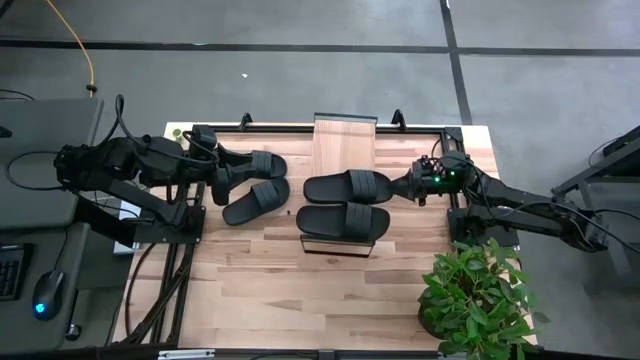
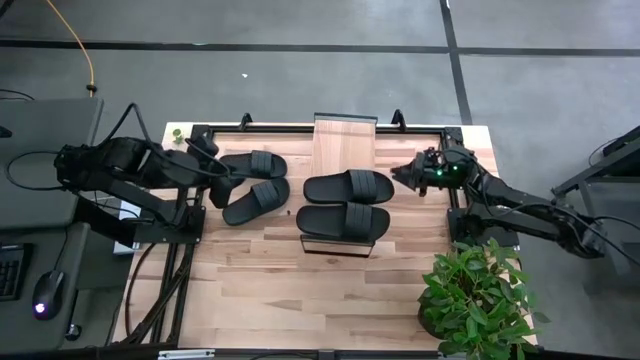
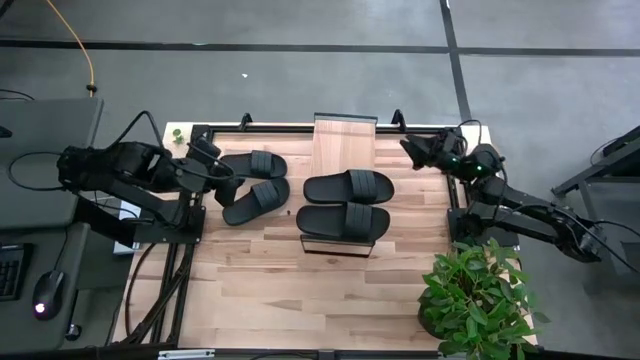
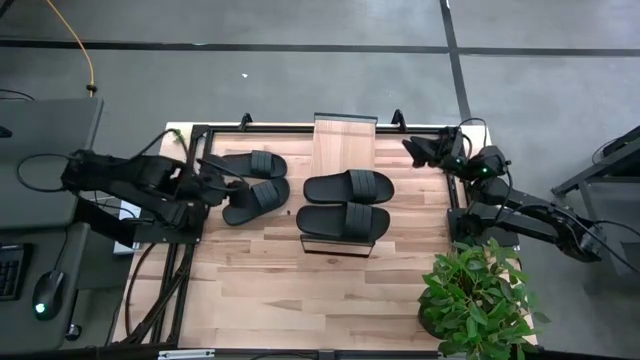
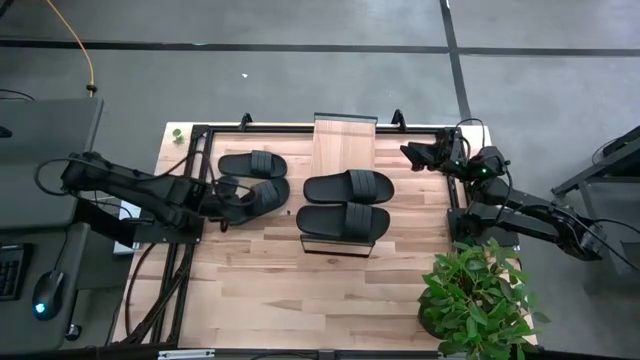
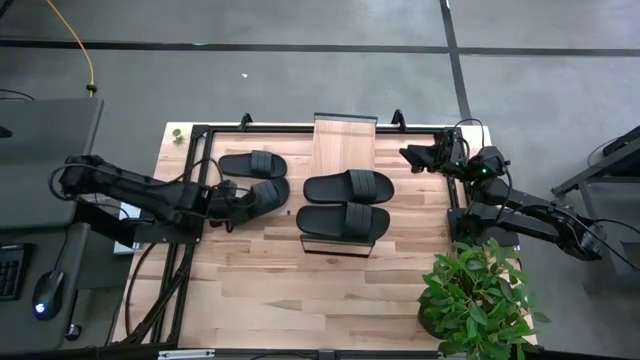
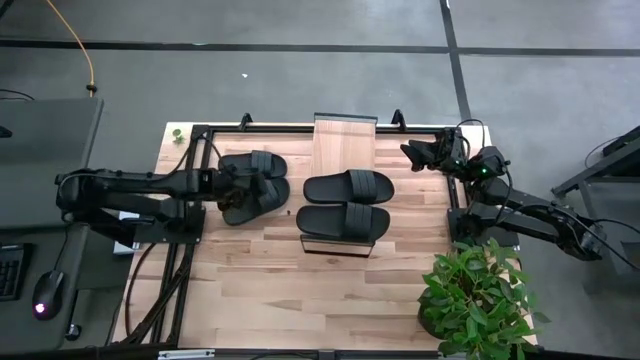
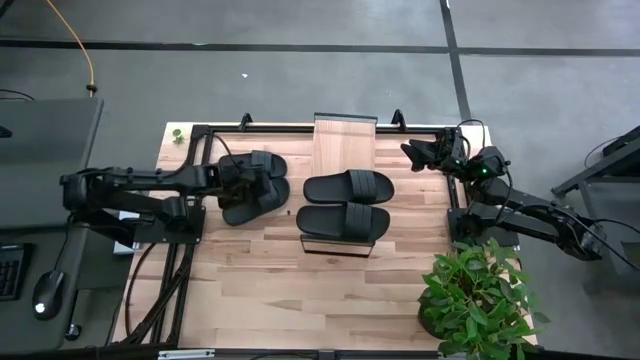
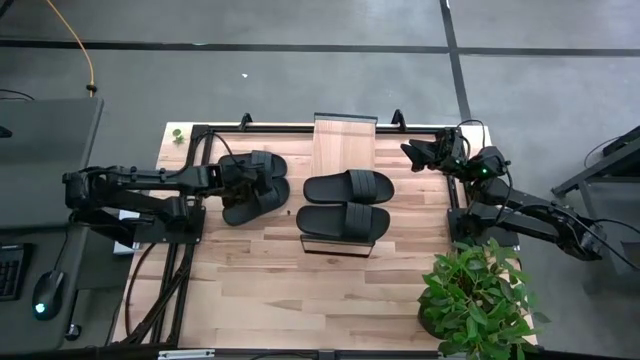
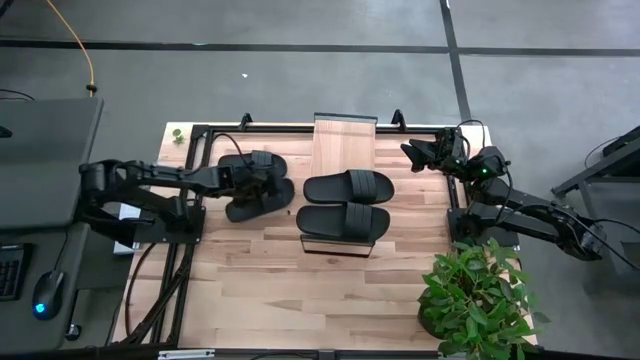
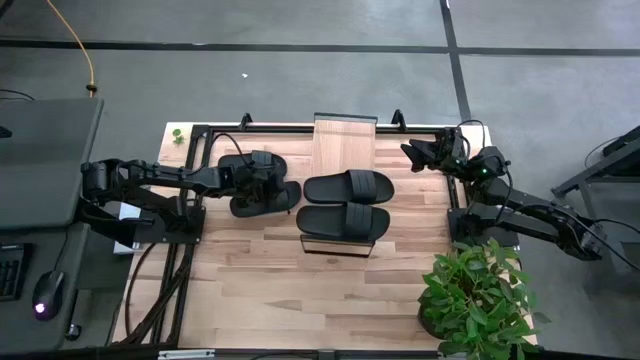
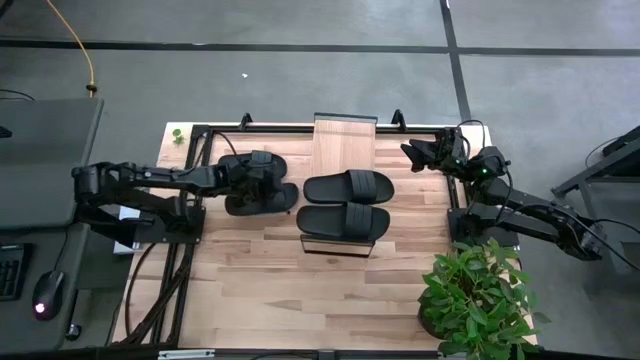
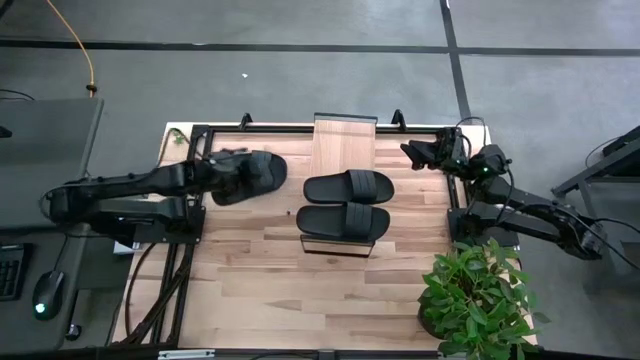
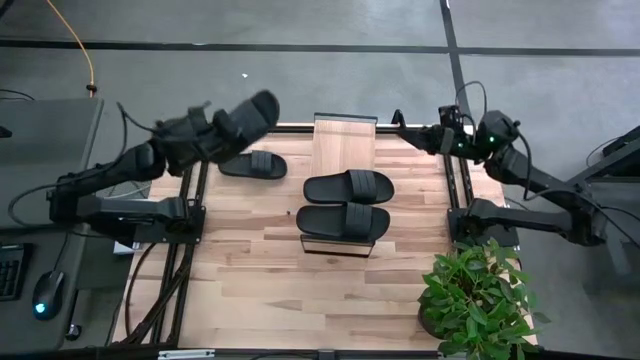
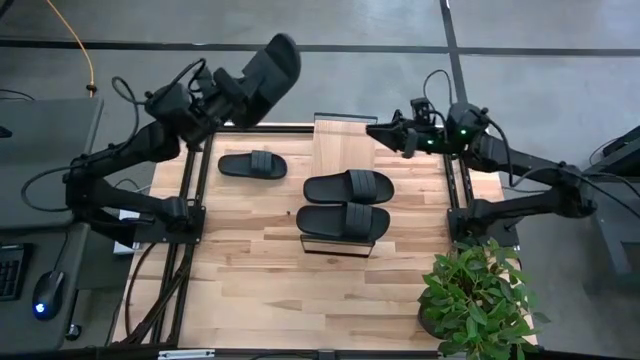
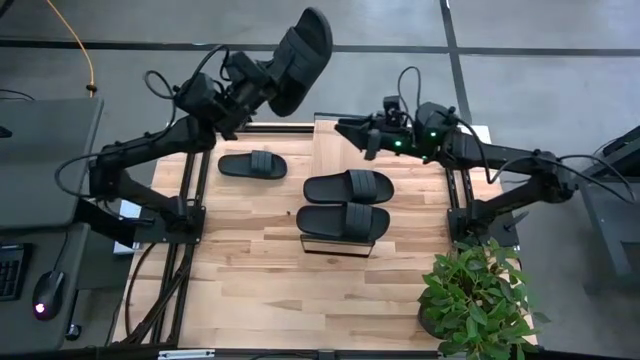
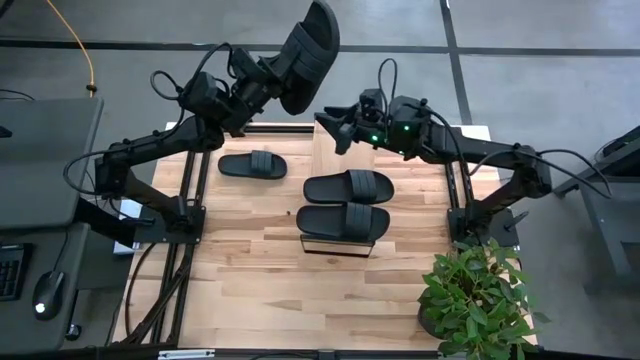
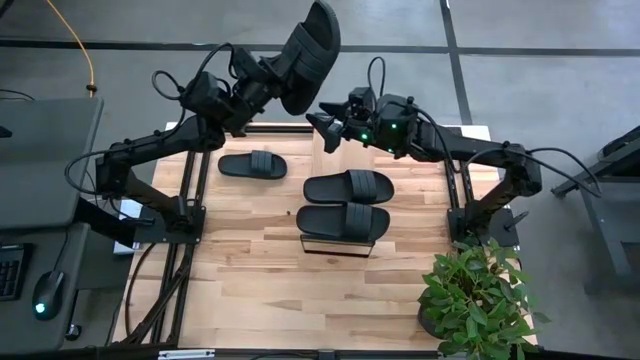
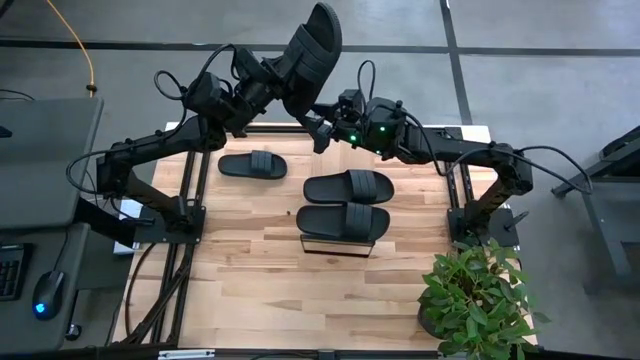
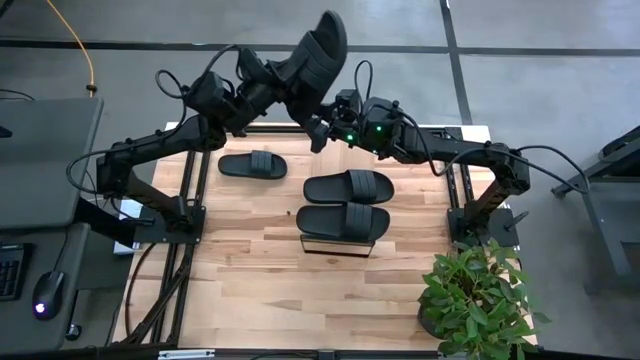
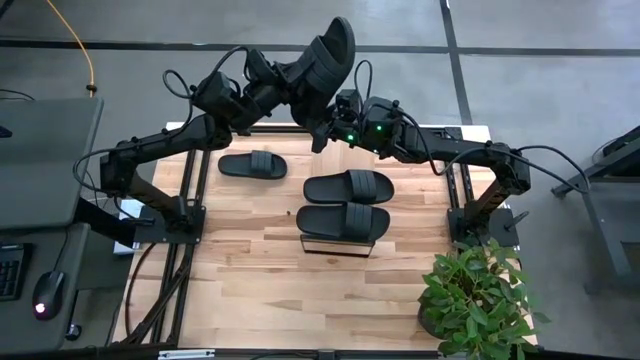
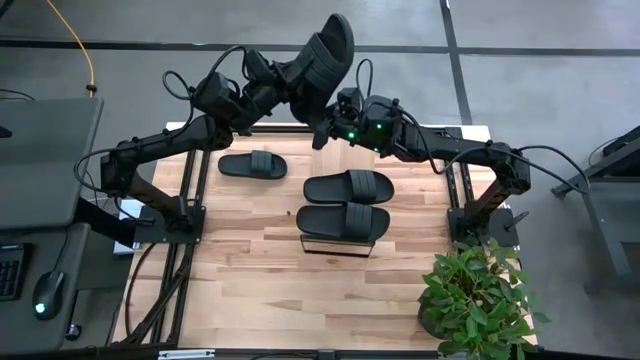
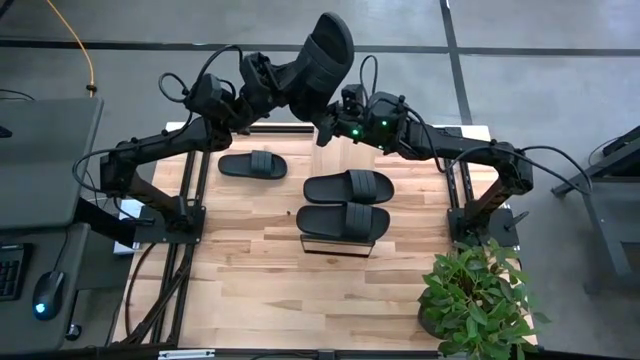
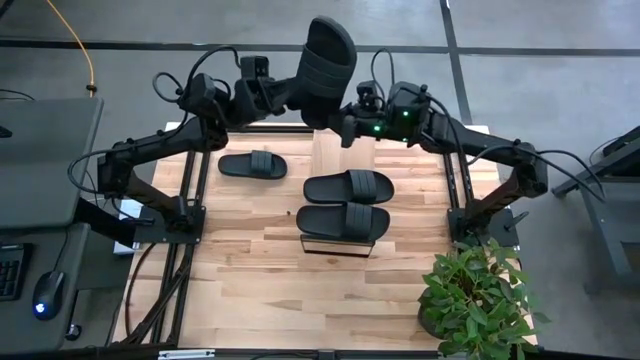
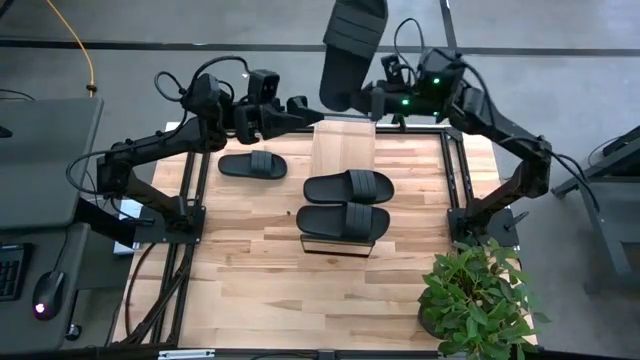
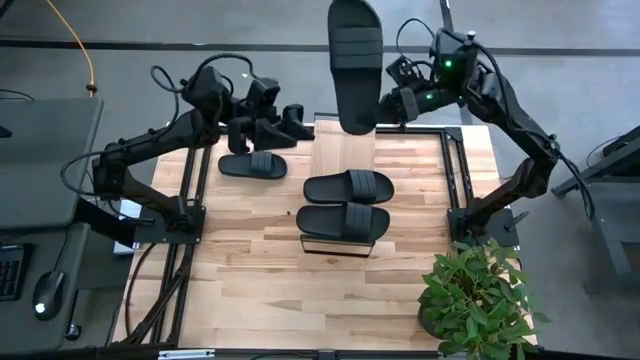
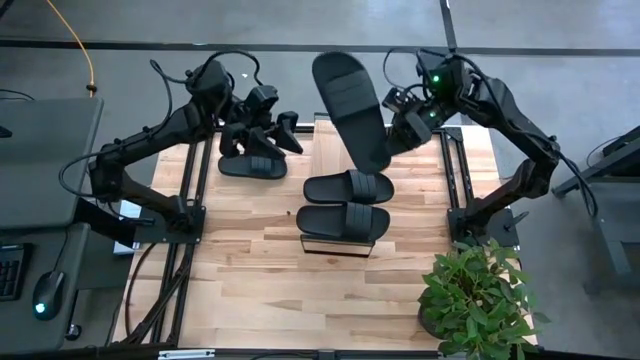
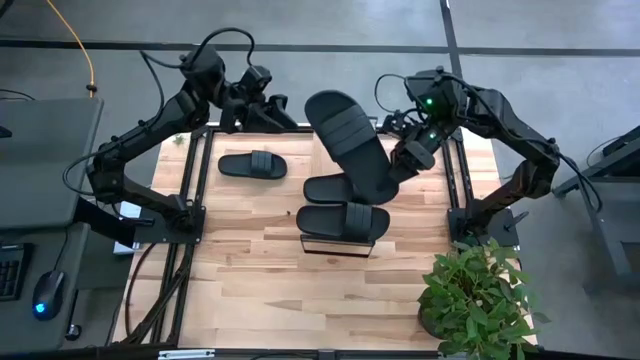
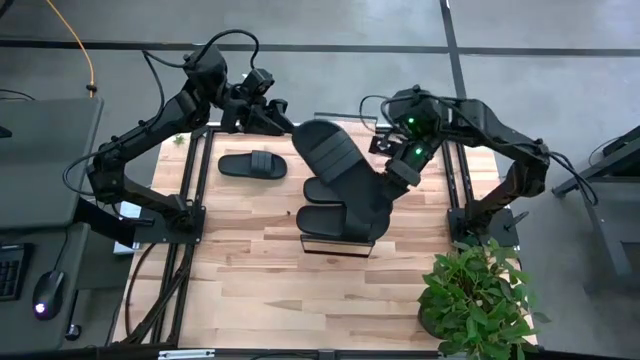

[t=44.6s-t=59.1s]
Task: Pick and place slides into the shelf
Put the black slide on the shelf

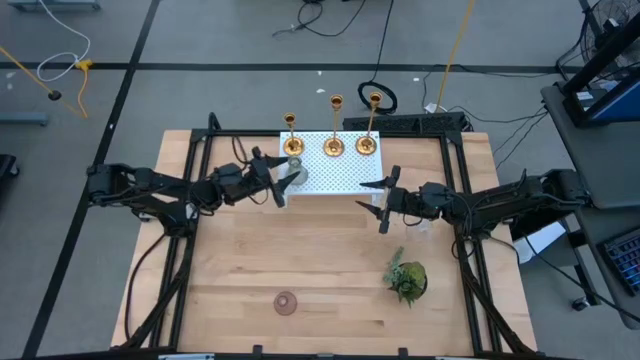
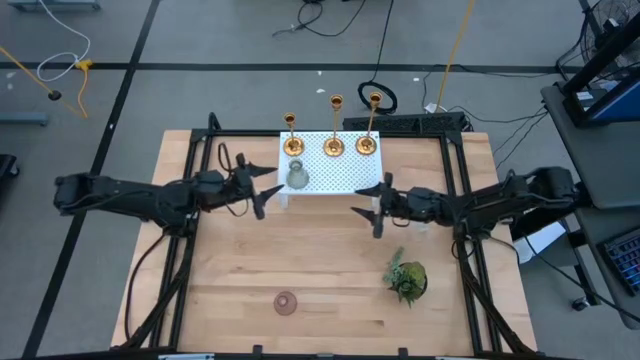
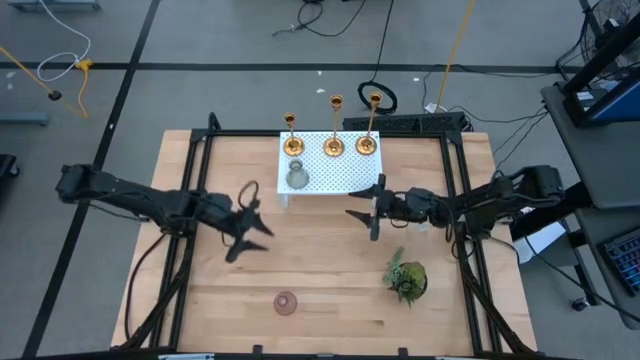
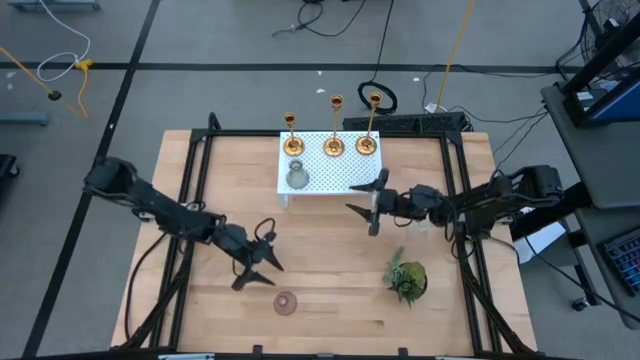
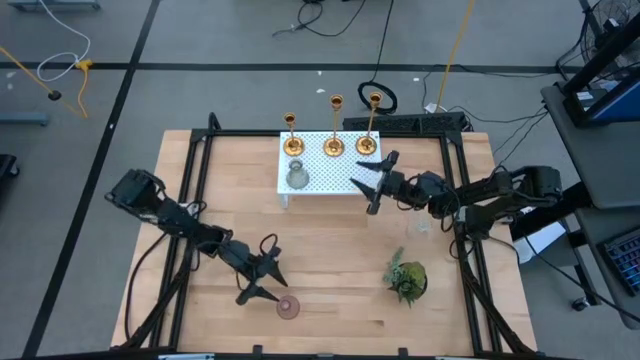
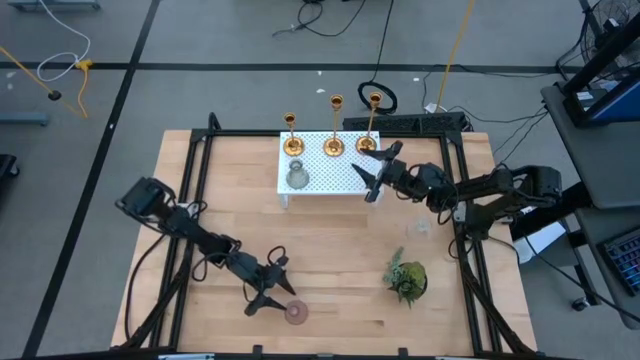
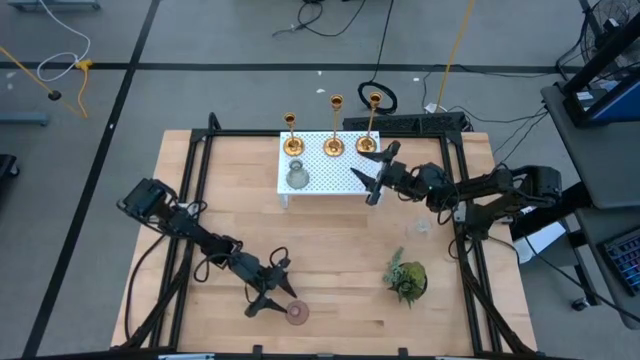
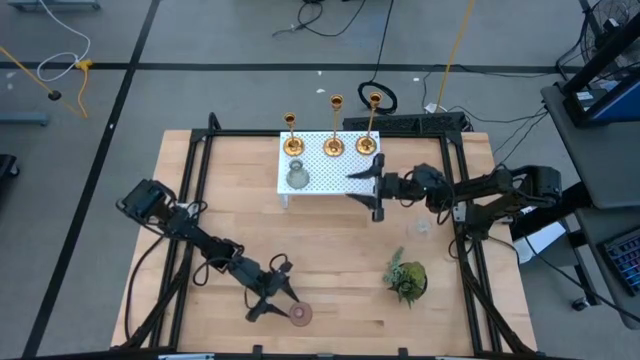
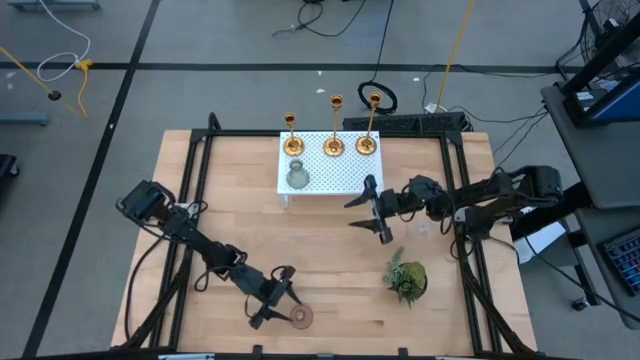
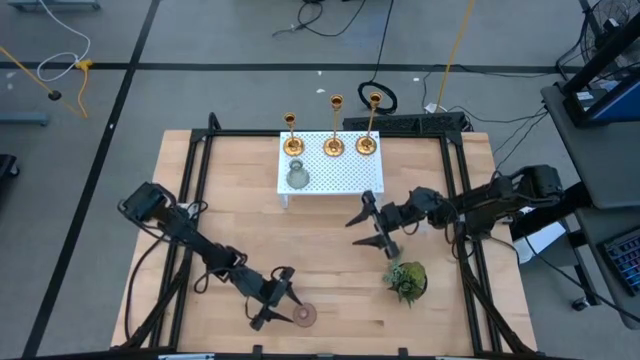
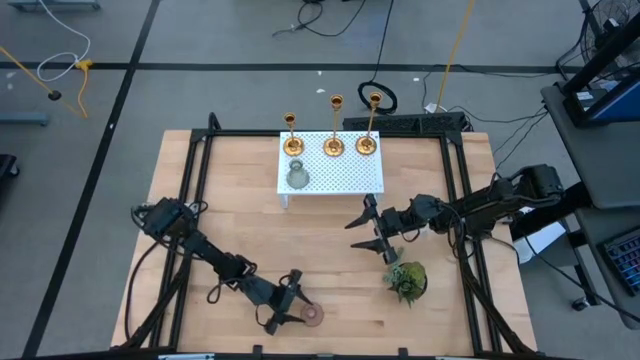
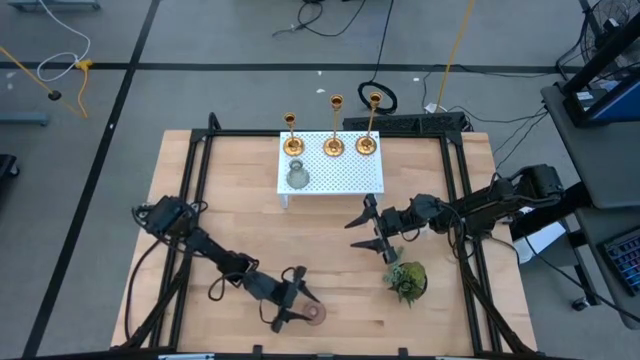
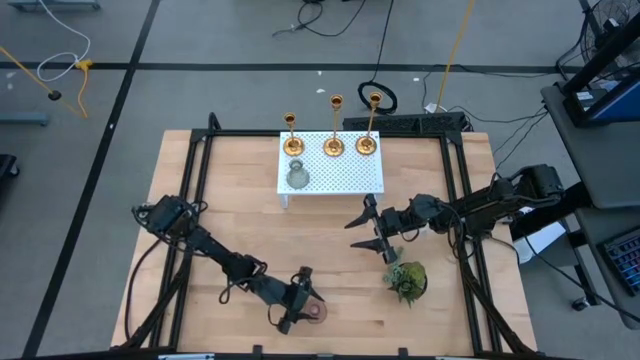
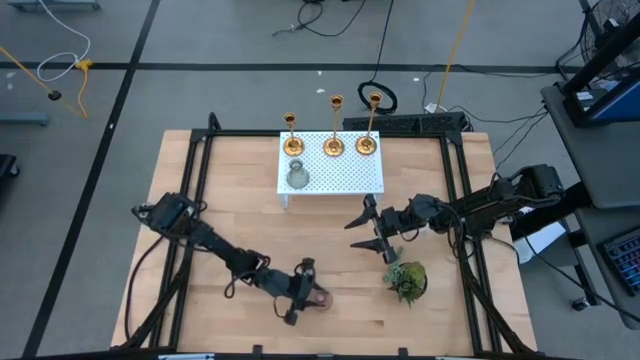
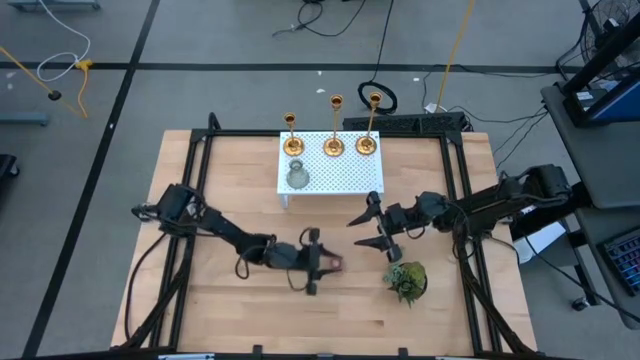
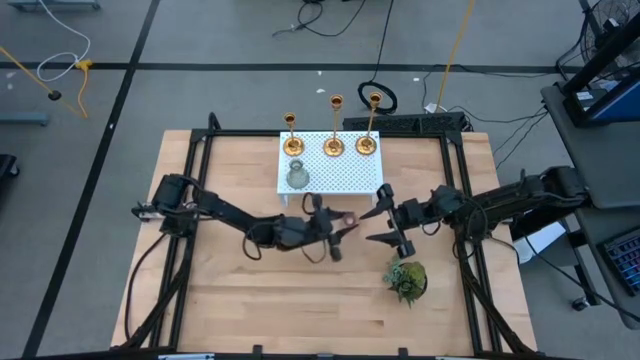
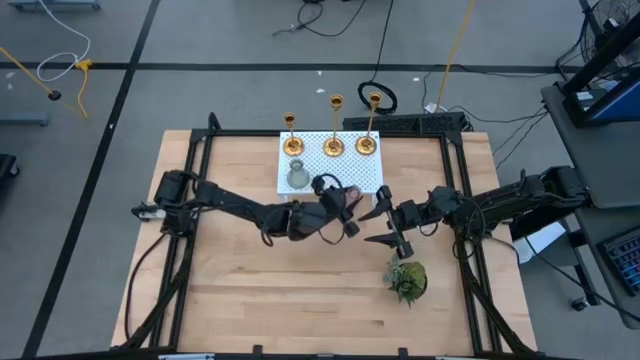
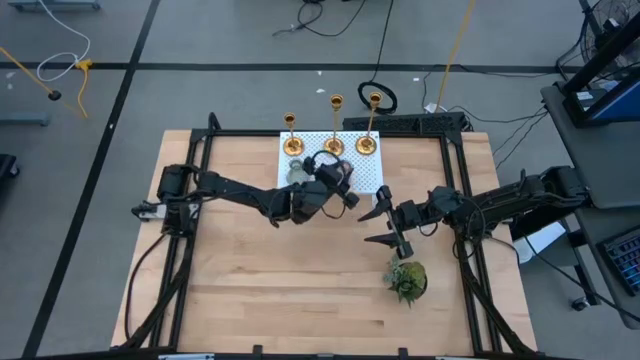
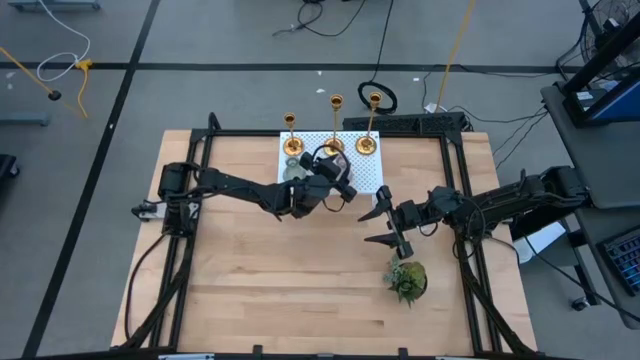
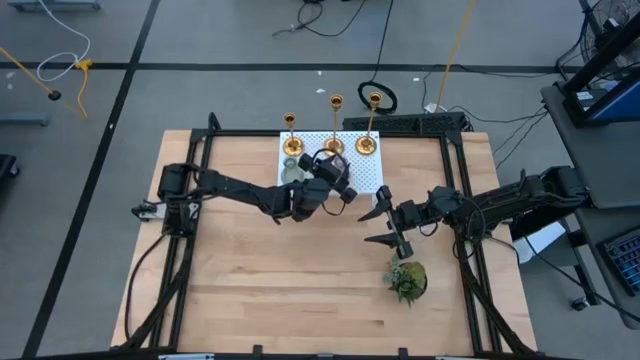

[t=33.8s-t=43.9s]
Task: Pick & Place candle stick holders
Put the pink candle holder on the shelf
